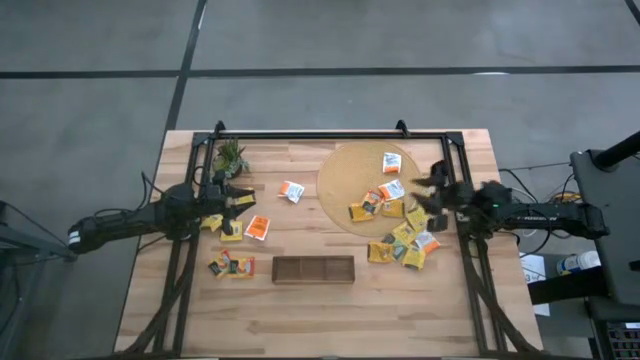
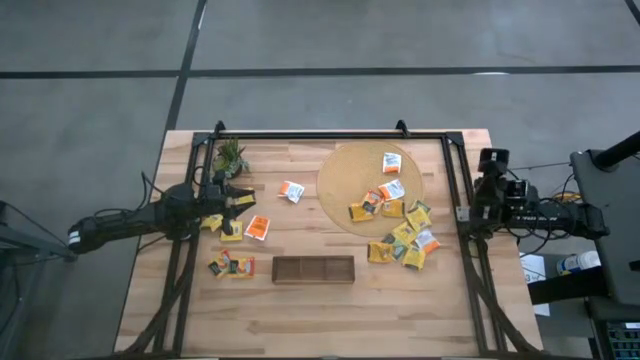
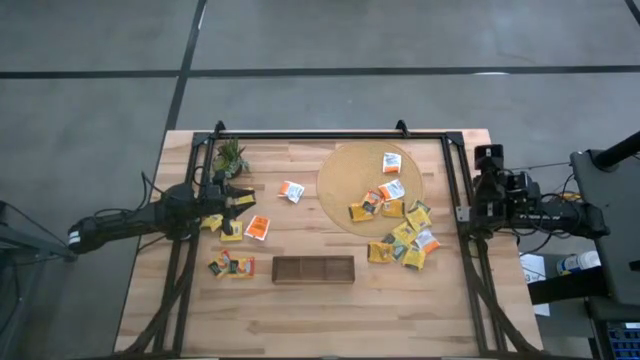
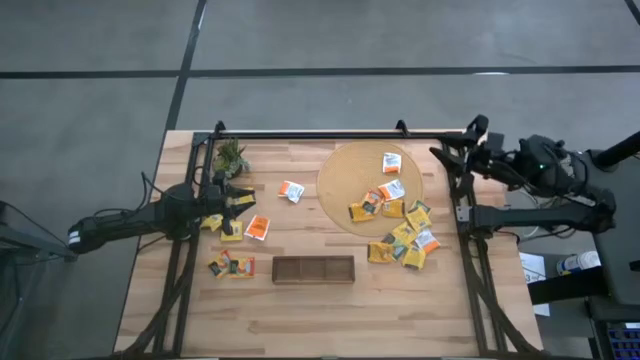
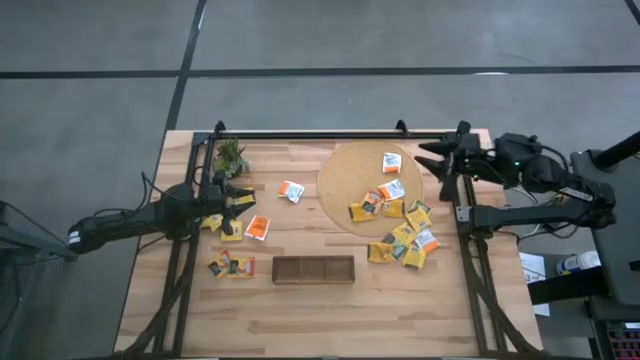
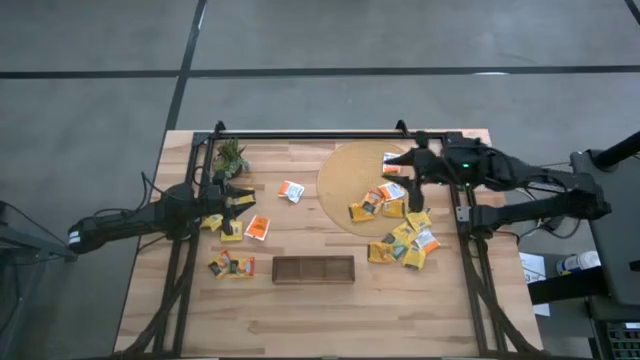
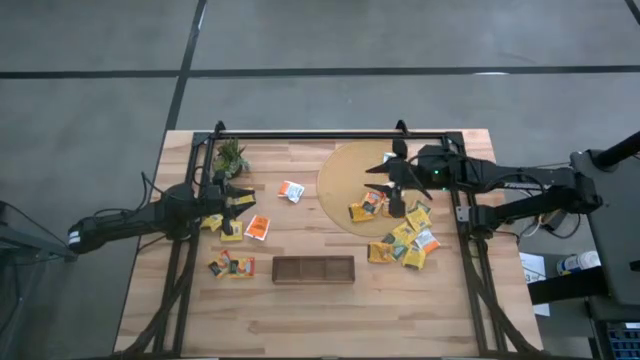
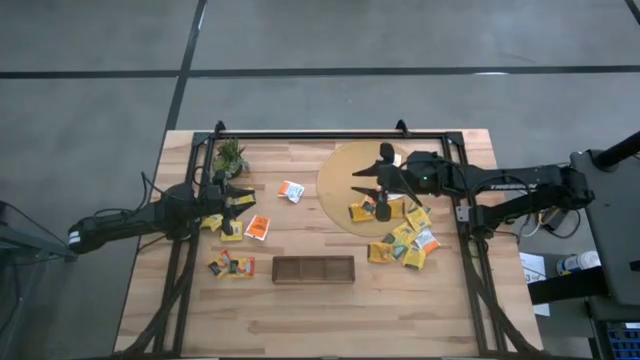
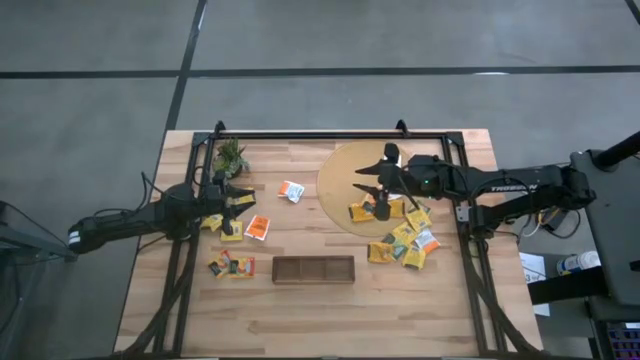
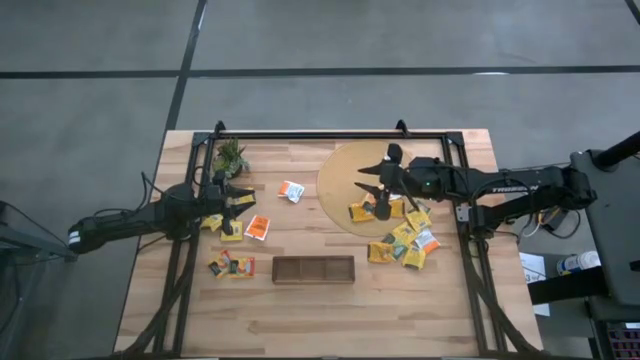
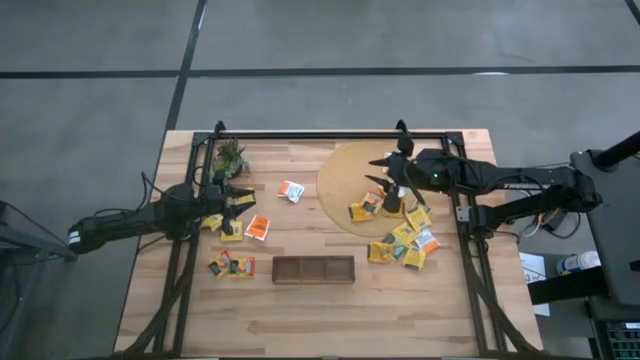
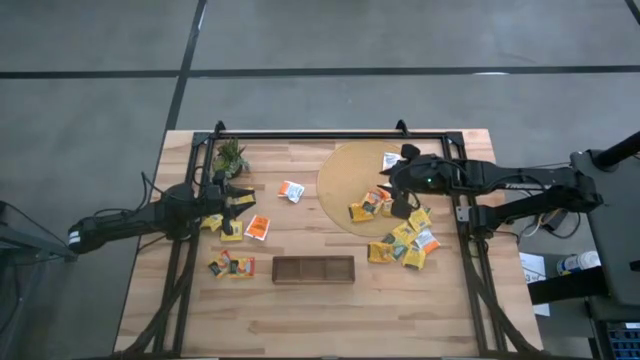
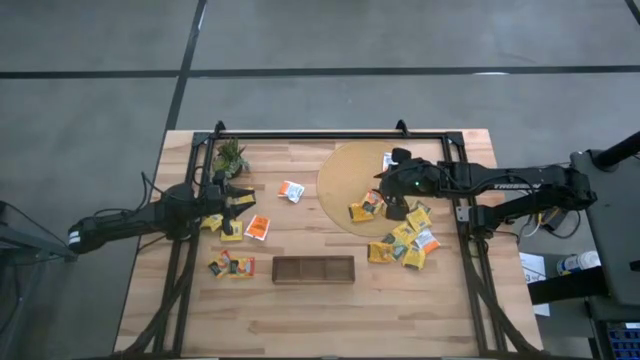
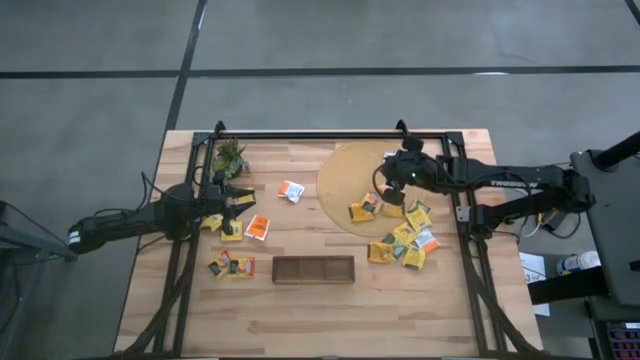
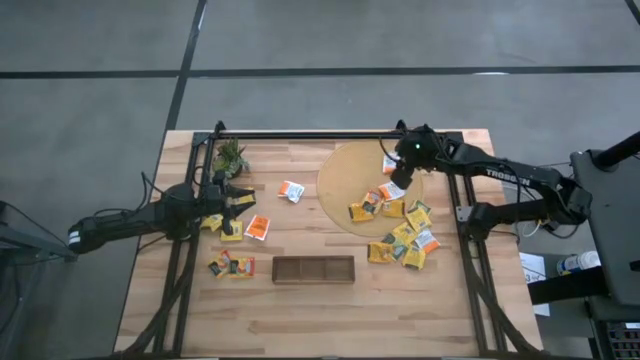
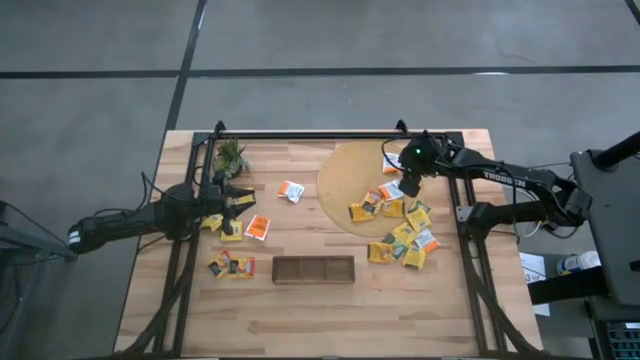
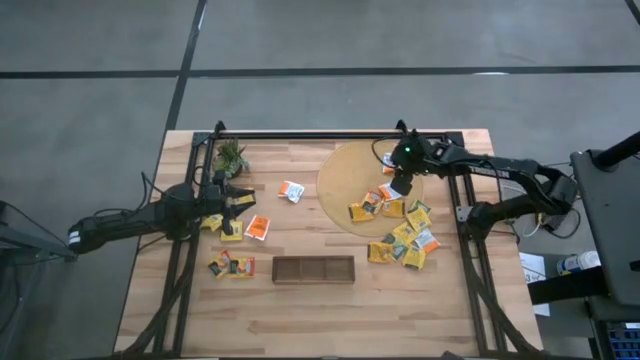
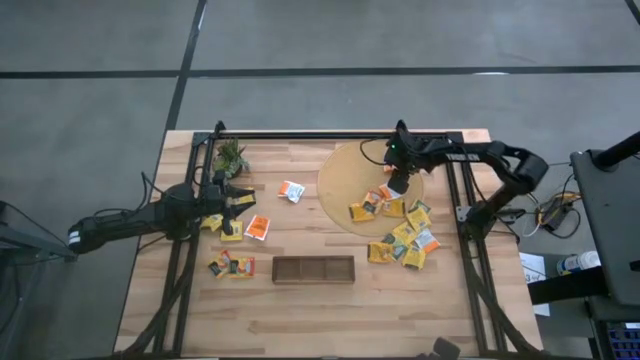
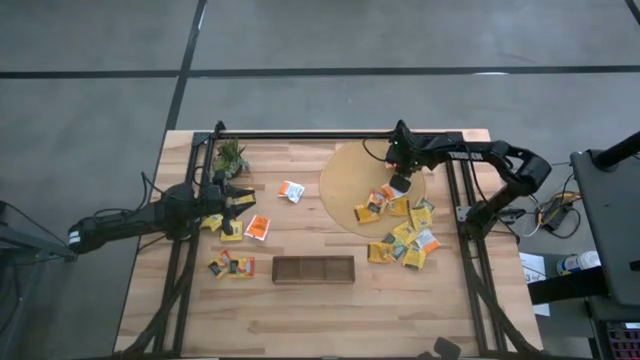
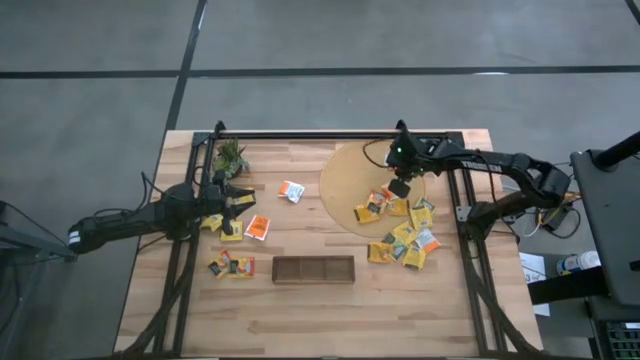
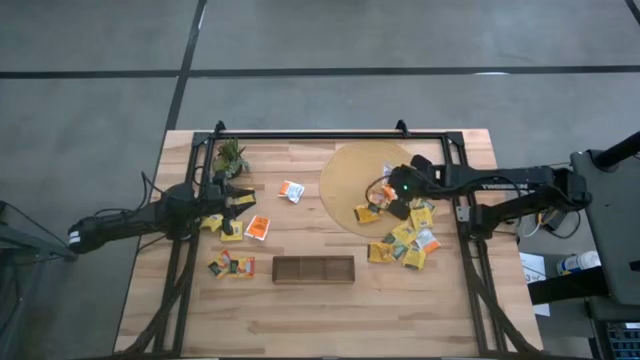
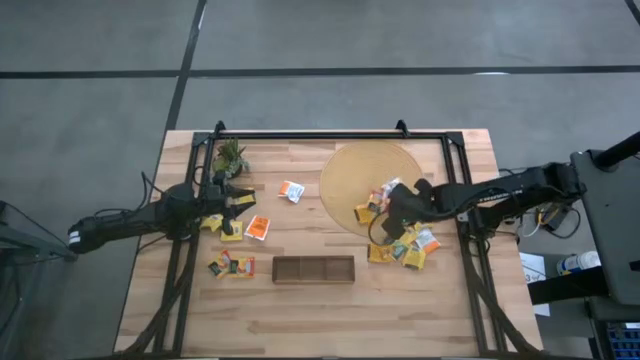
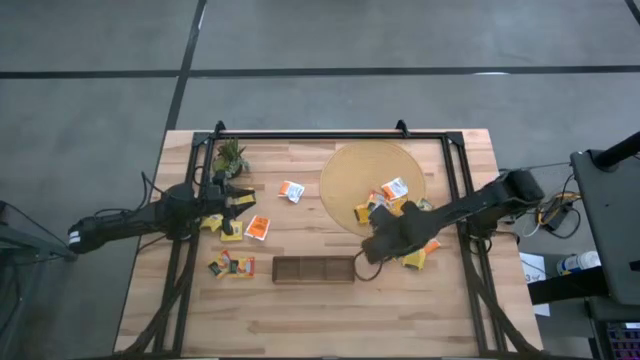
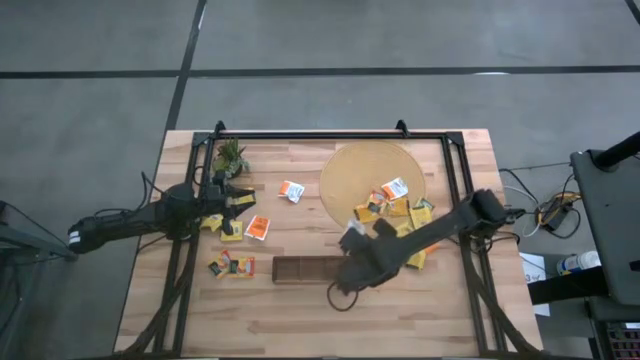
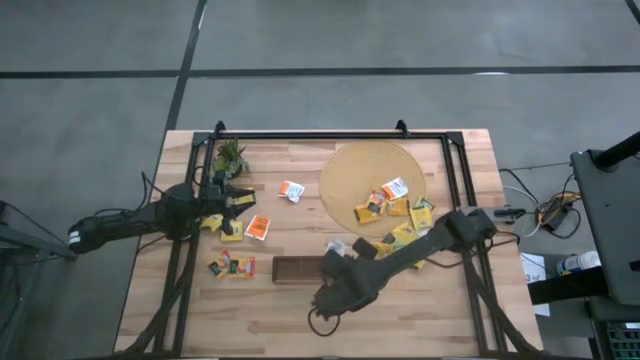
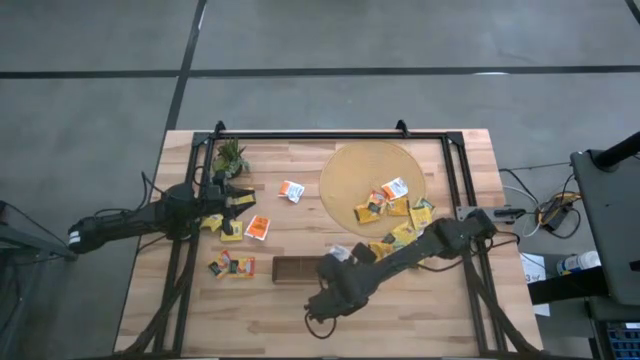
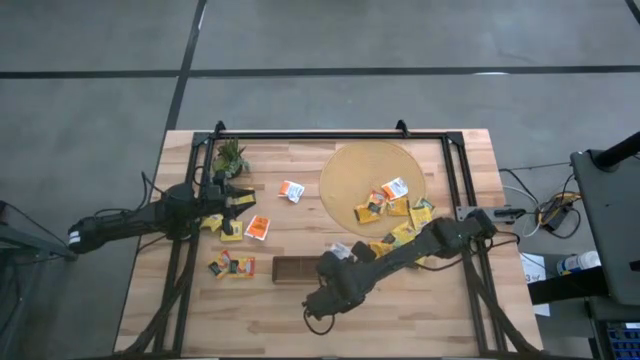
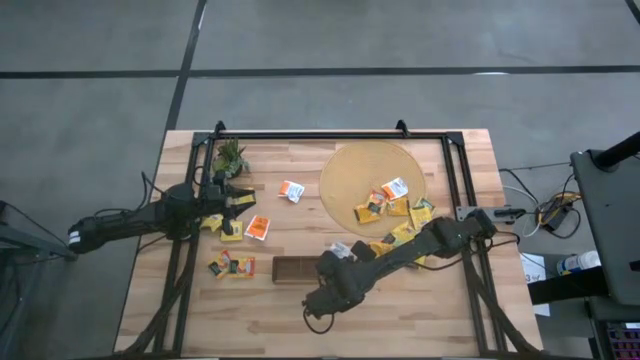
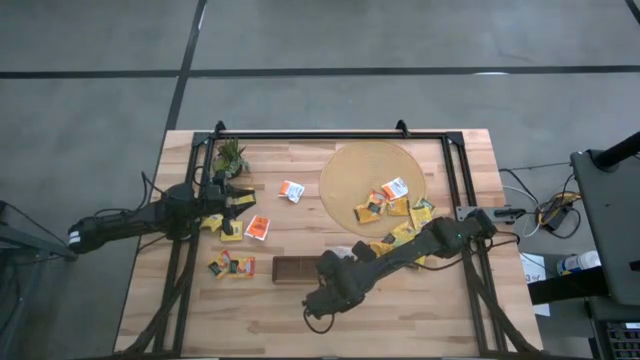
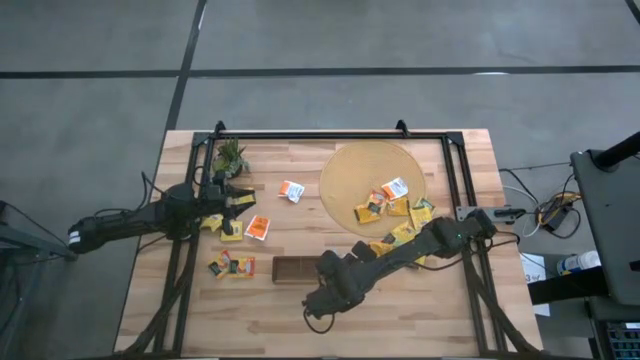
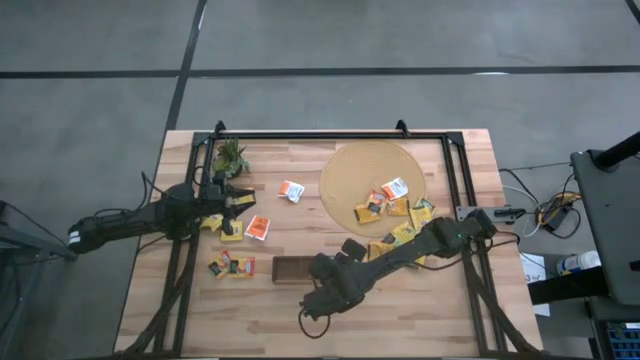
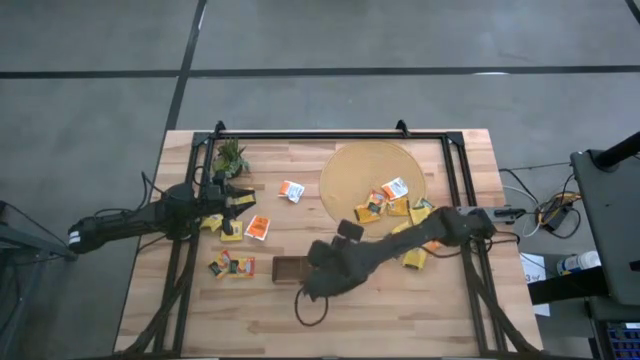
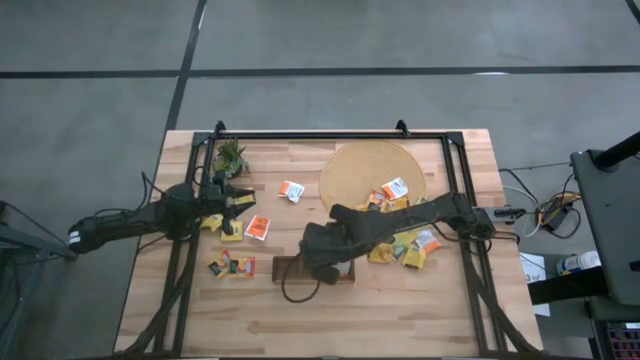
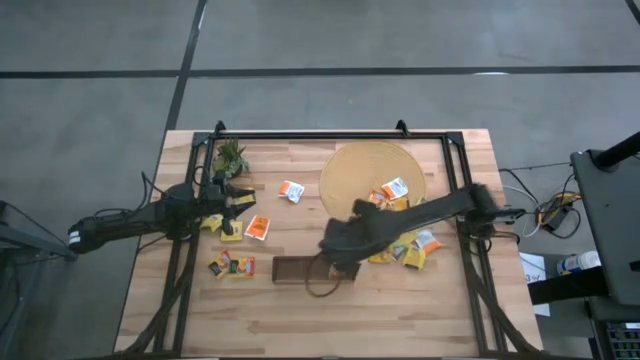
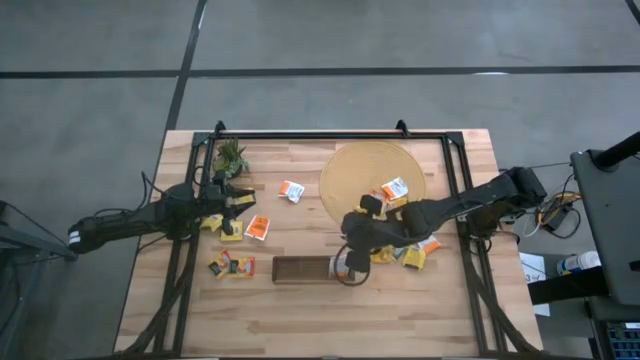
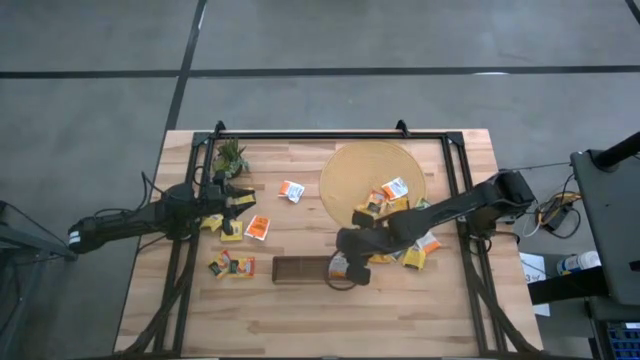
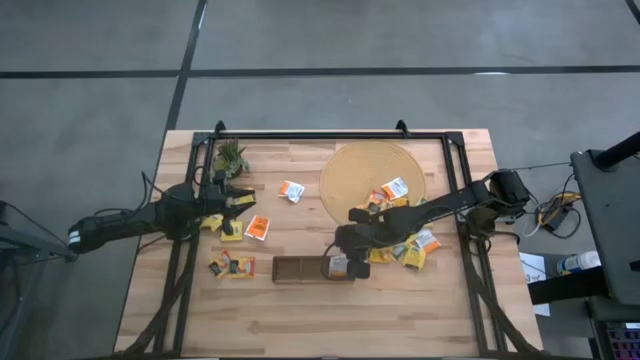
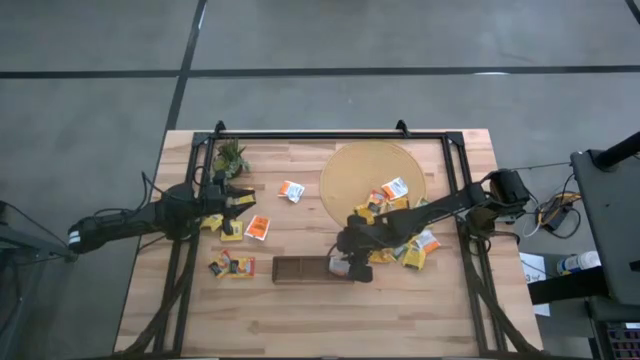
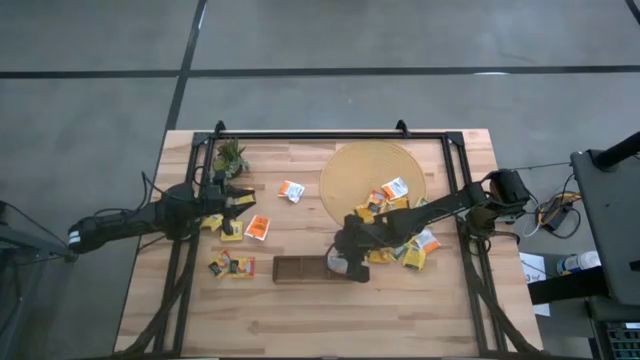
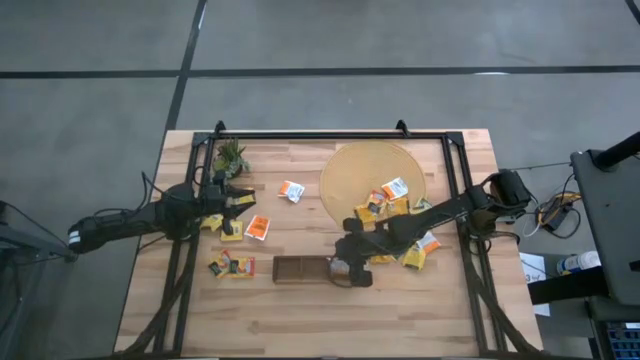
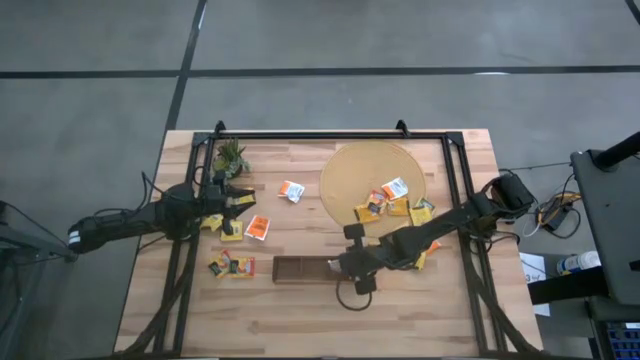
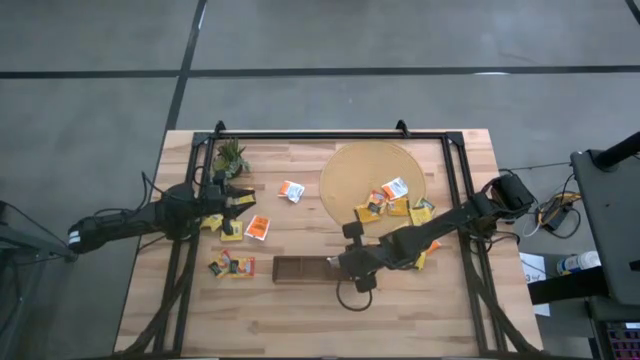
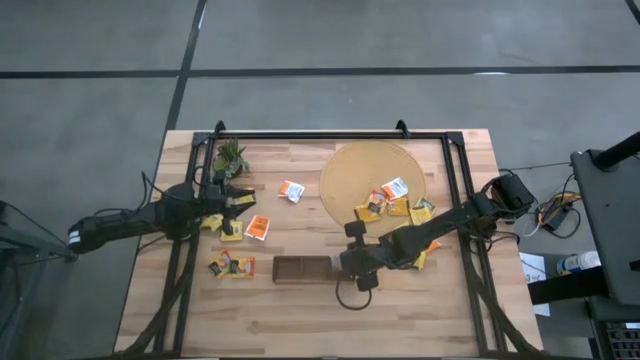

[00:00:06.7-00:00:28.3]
Task: Pick & Place Tea
Put the white tea bag into the right section of the wooden organizer
